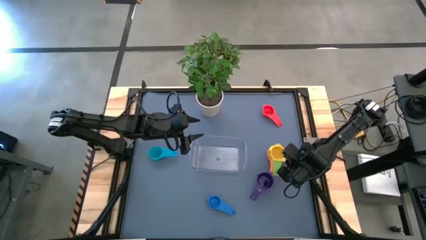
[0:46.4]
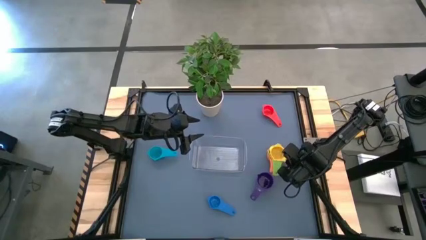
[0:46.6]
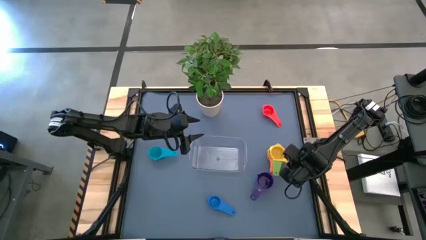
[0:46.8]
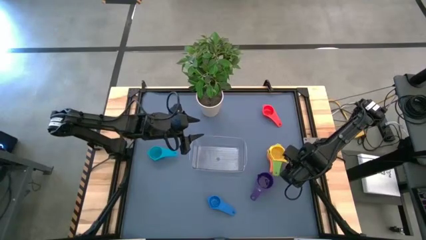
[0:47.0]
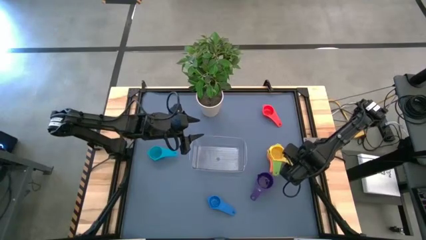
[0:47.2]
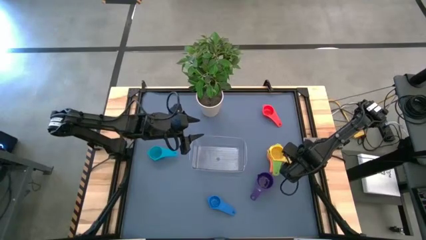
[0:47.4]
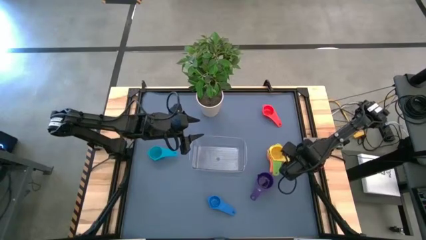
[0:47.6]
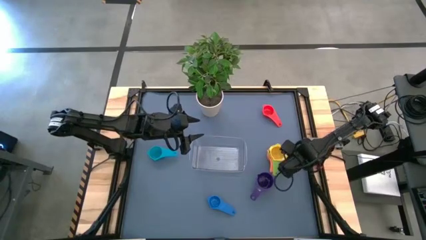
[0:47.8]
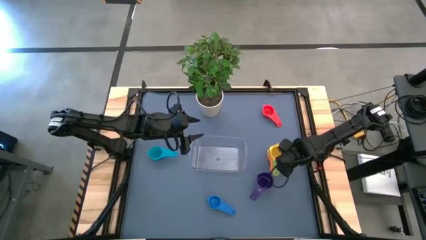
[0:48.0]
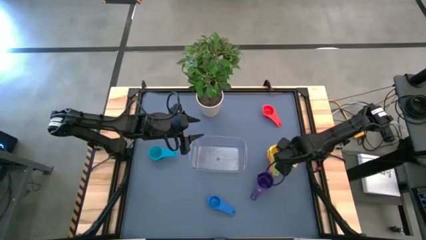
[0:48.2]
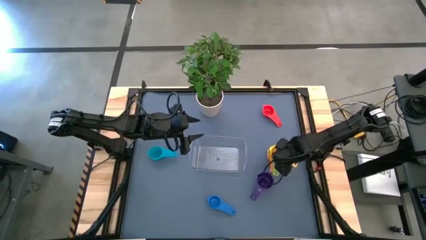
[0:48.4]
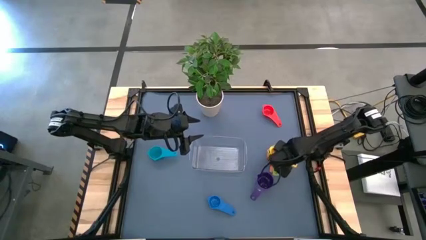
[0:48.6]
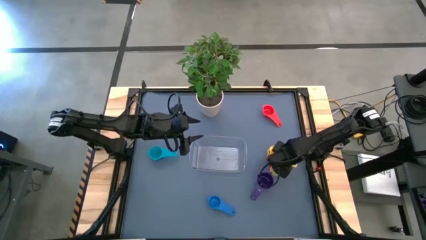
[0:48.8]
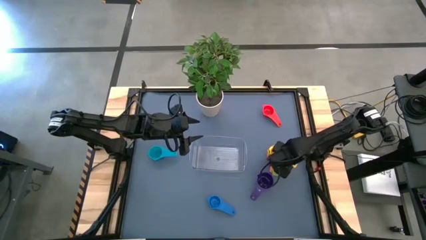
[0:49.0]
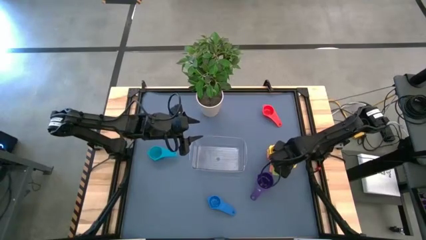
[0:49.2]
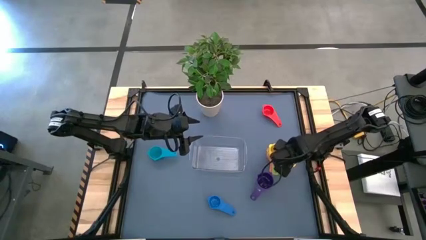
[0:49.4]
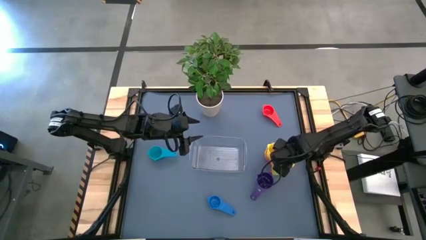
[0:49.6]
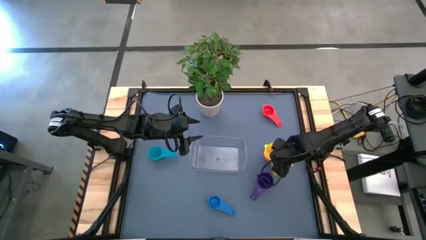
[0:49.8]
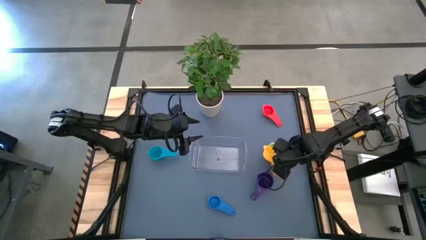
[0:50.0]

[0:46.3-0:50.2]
Task: Nest measuring cups in basket
Remove the yellow measuring cup from the green measuring cup

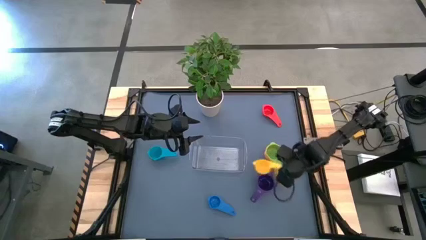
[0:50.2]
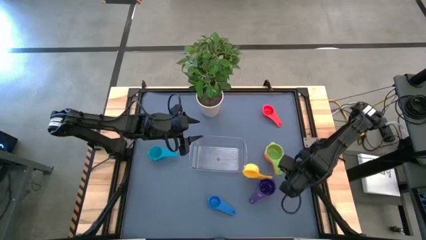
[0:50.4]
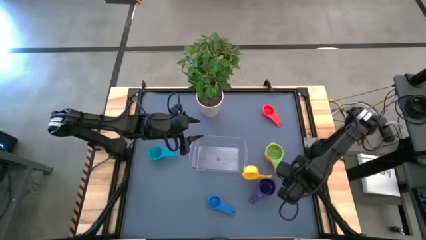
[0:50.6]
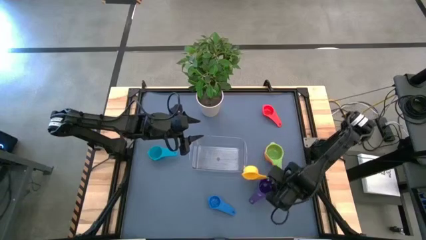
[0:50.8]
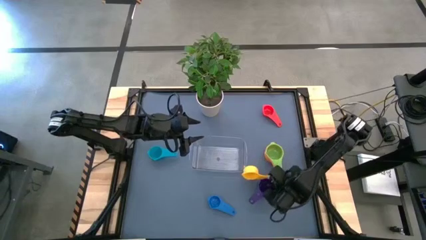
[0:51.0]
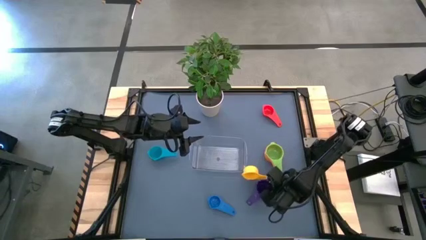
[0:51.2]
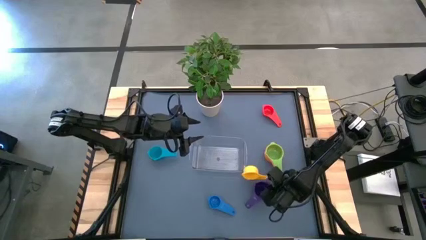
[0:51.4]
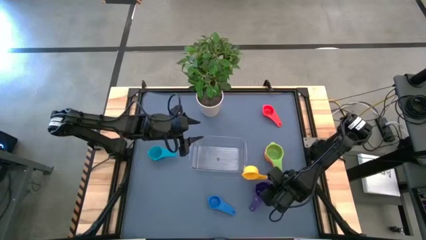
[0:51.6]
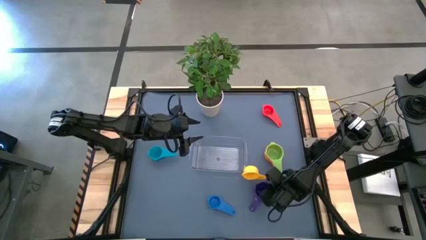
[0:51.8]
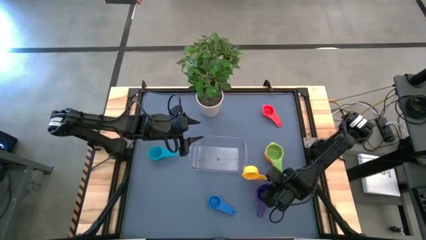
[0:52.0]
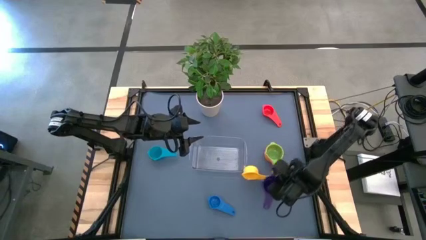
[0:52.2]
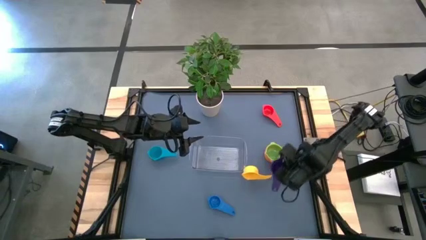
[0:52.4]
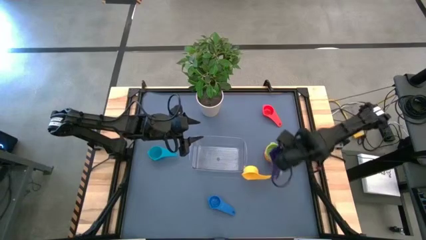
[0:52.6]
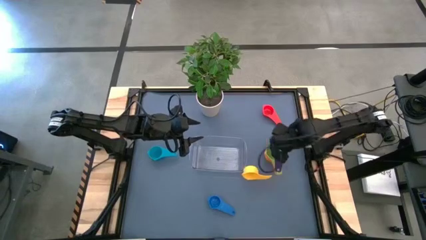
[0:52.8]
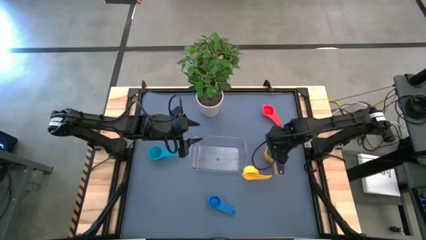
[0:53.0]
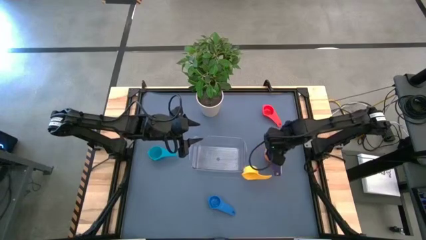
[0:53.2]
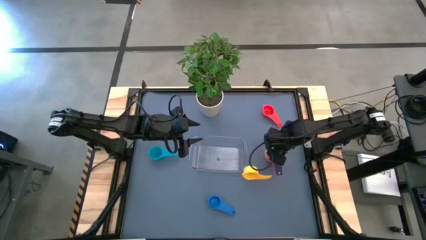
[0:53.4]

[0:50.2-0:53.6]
Stack the violet measuring cup on top of the green measuring cup

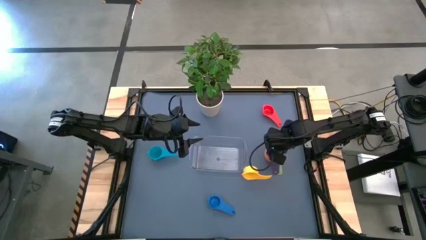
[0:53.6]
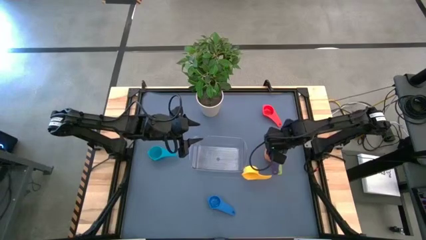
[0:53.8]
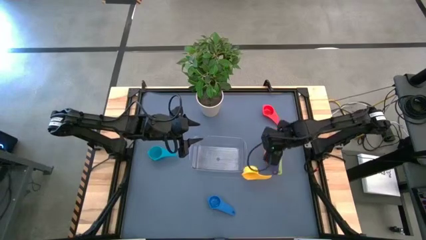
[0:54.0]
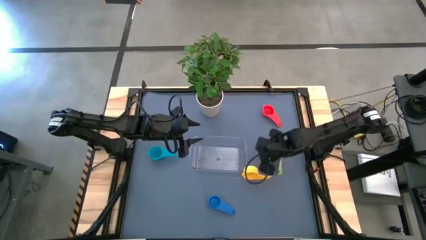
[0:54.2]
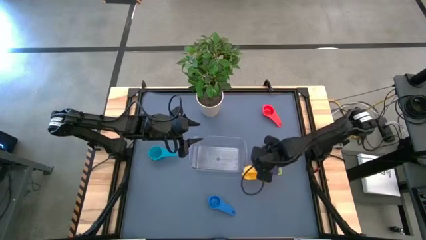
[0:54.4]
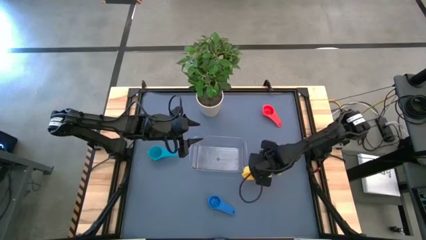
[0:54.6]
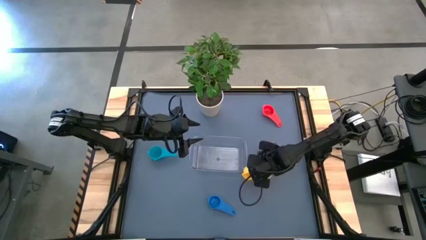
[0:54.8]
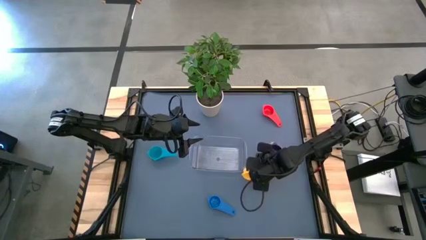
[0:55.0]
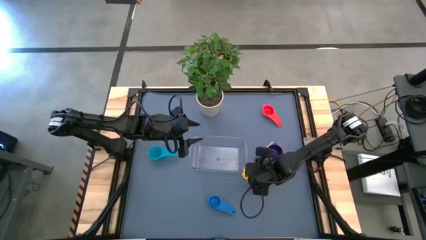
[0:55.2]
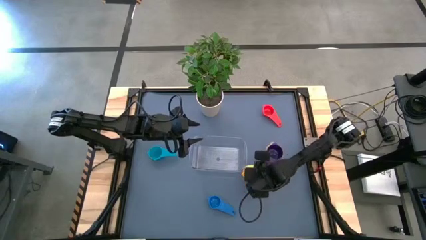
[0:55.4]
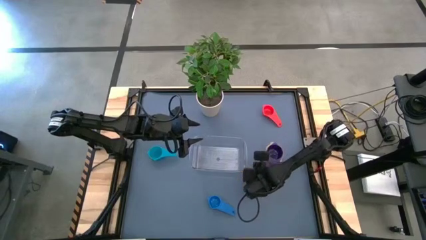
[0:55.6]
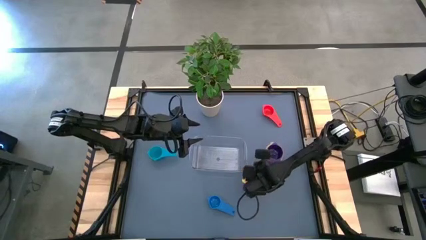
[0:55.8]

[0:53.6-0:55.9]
Stack the yellow measuring cup on top of the violet measuring cup

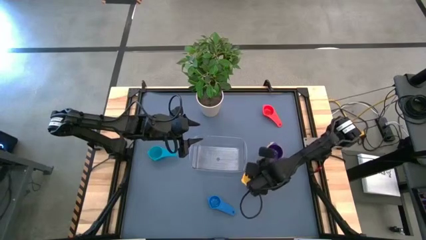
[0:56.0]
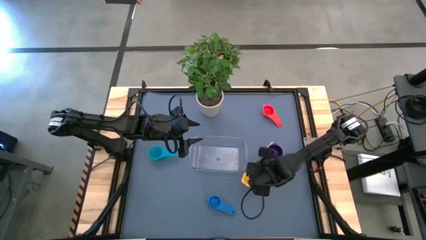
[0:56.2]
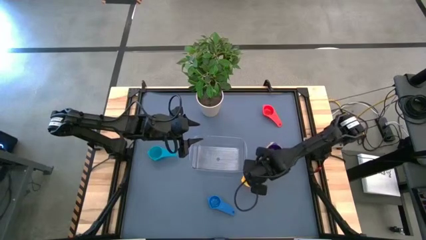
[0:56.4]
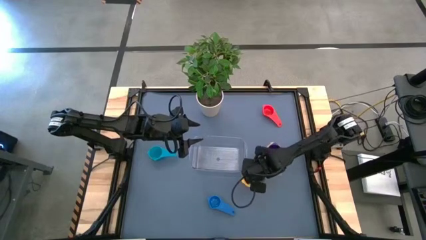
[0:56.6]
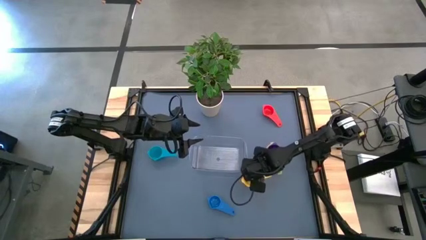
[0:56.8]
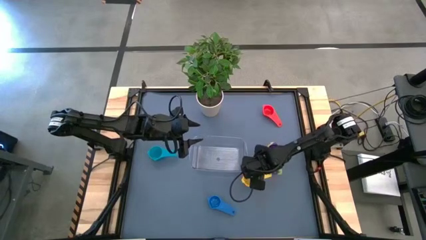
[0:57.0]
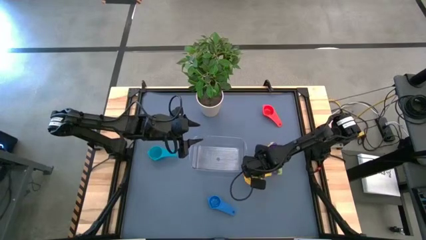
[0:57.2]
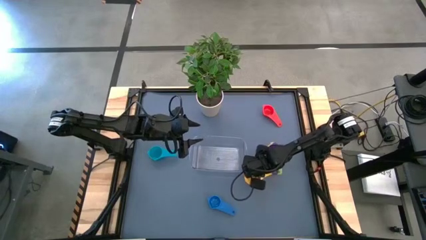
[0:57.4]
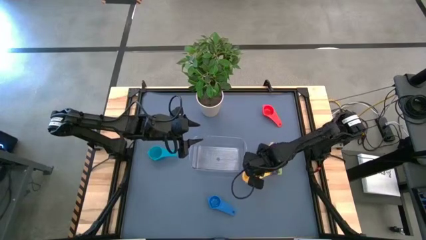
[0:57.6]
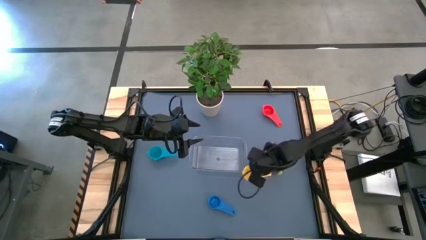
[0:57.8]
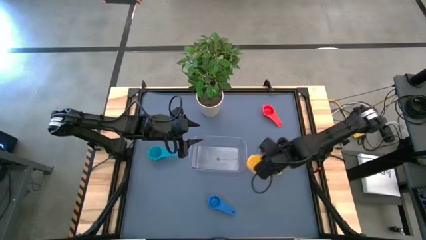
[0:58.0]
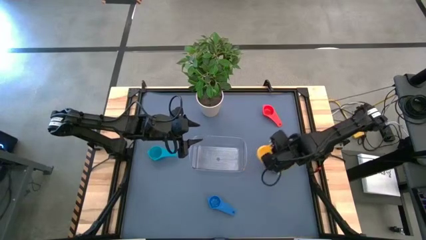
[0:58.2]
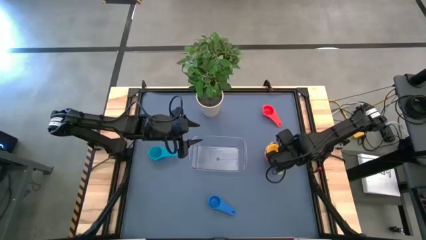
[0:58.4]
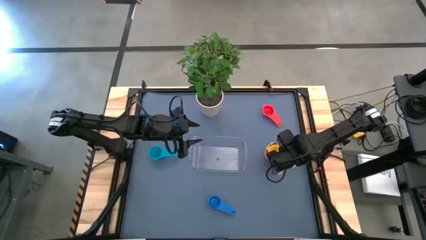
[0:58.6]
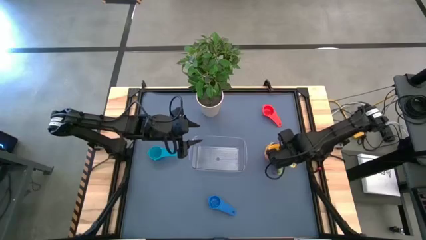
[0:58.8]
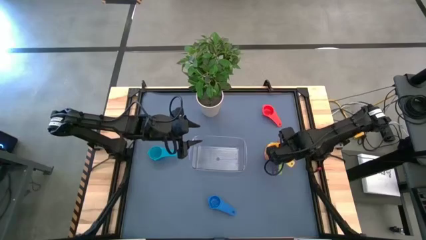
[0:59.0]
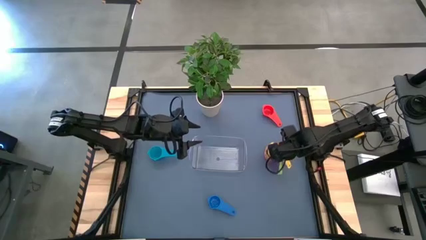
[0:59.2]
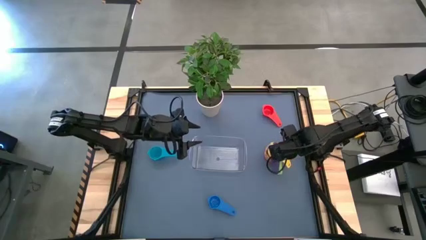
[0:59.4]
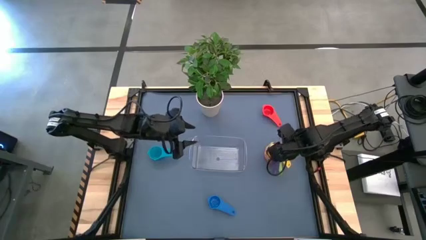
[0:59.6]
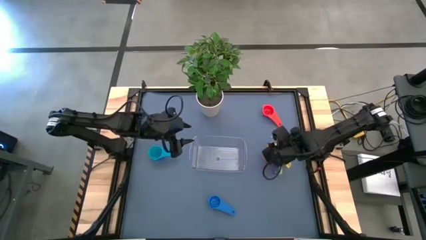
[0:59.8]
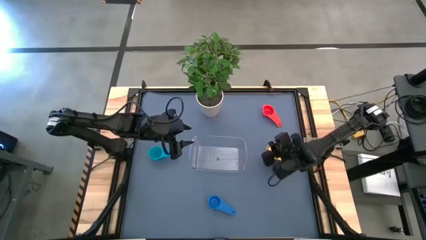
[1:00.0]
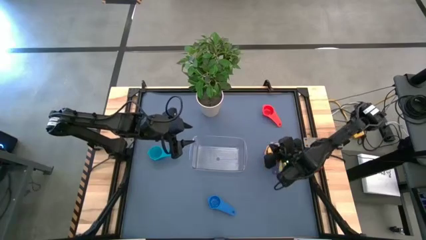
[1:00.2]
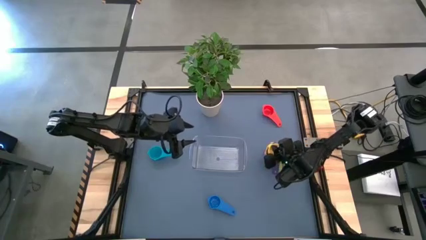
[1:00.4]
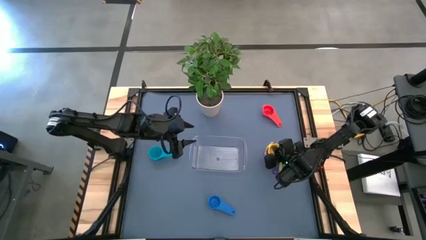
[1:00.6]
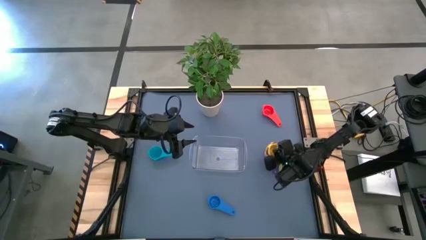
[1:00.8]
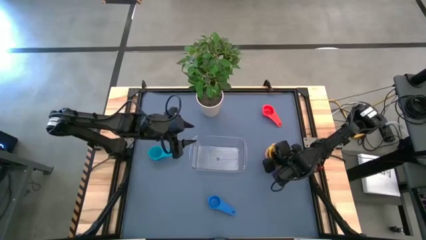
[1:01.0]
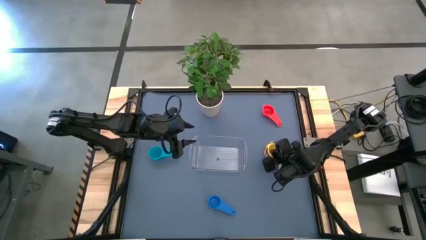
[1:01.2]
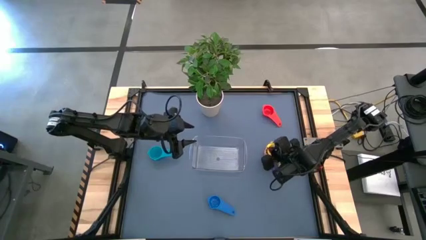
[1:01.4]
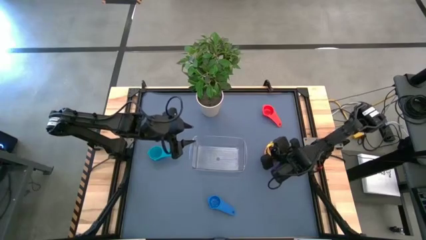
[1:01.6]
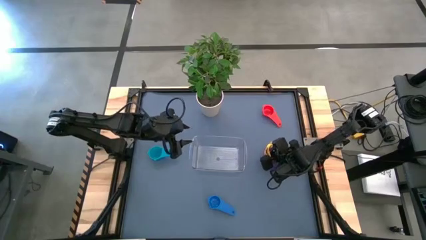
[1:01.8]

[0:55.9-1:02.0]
Stack the yellow measuring cup on top of the violet measuring cup
